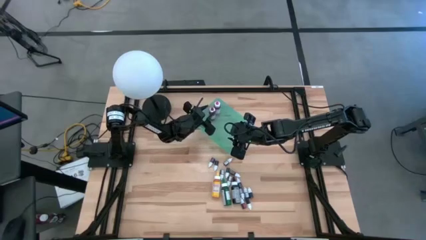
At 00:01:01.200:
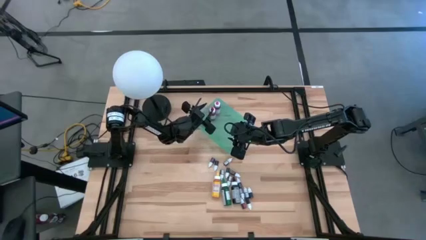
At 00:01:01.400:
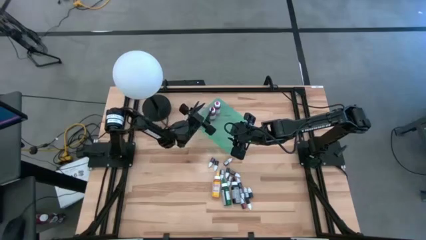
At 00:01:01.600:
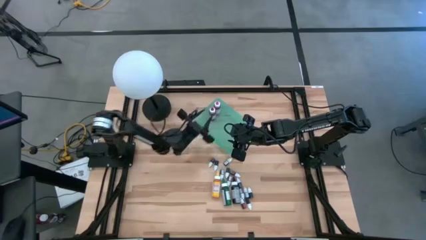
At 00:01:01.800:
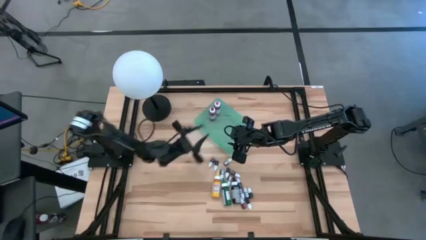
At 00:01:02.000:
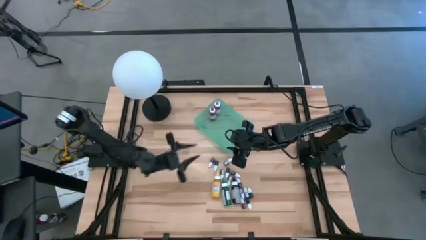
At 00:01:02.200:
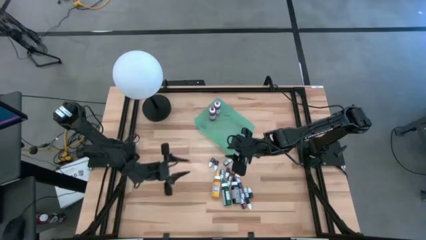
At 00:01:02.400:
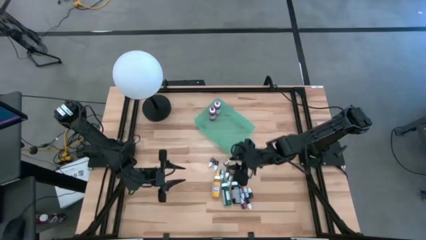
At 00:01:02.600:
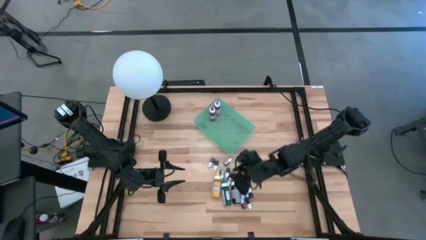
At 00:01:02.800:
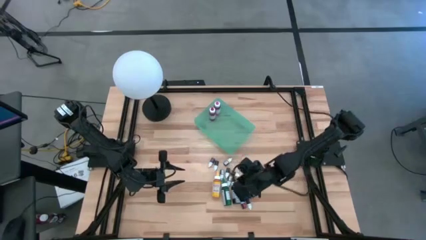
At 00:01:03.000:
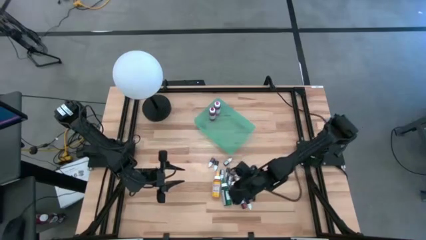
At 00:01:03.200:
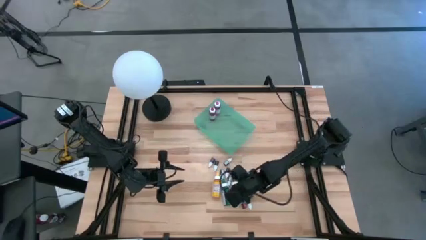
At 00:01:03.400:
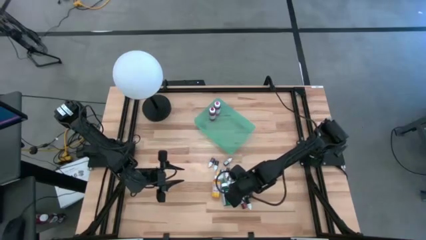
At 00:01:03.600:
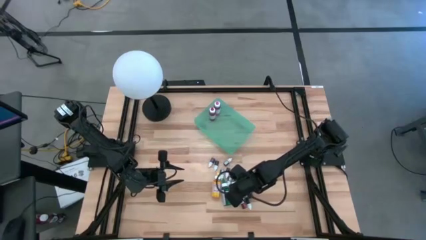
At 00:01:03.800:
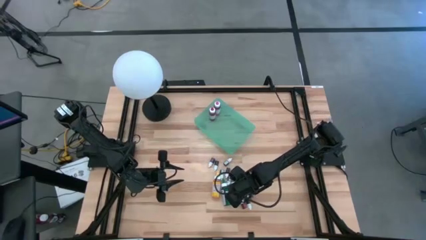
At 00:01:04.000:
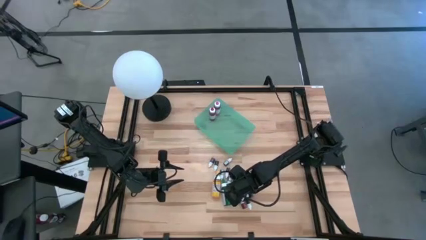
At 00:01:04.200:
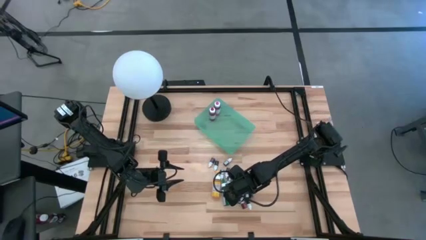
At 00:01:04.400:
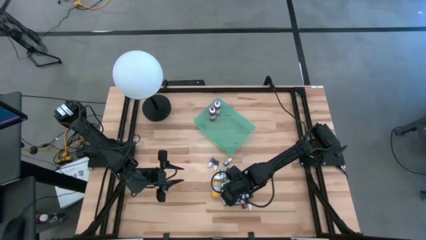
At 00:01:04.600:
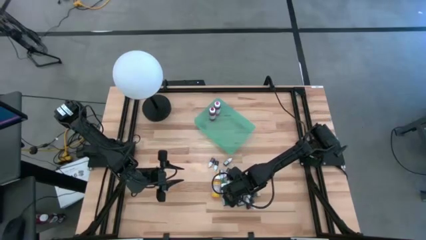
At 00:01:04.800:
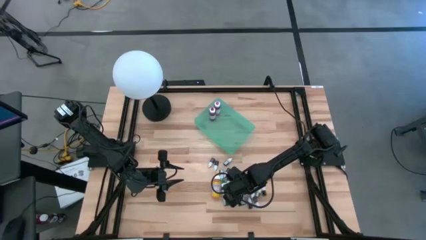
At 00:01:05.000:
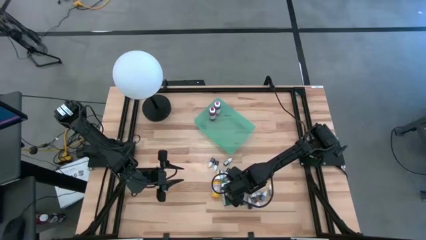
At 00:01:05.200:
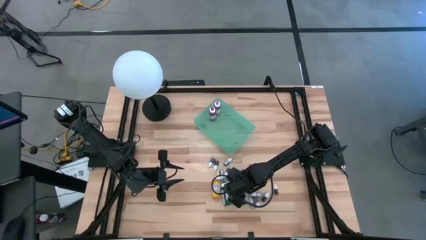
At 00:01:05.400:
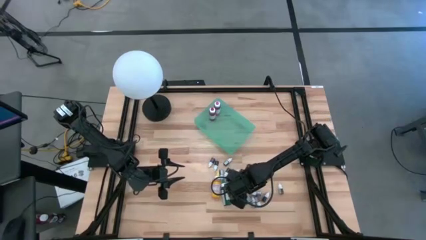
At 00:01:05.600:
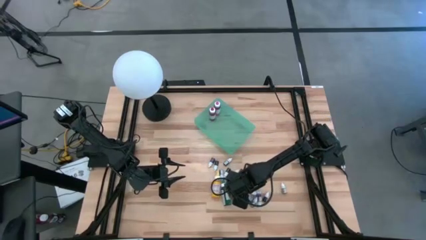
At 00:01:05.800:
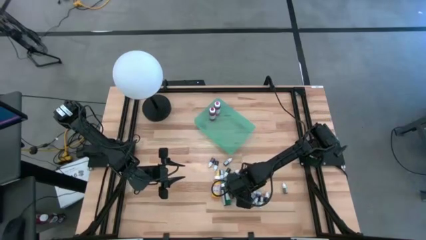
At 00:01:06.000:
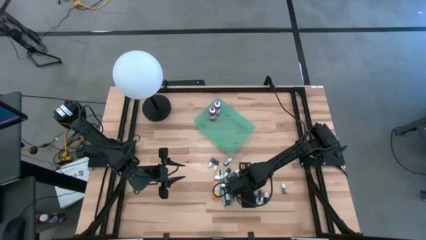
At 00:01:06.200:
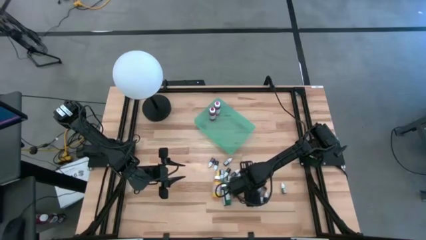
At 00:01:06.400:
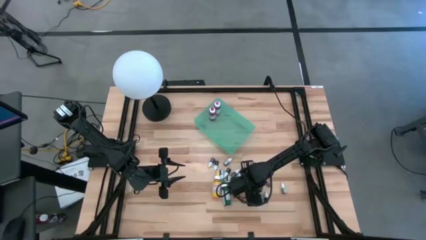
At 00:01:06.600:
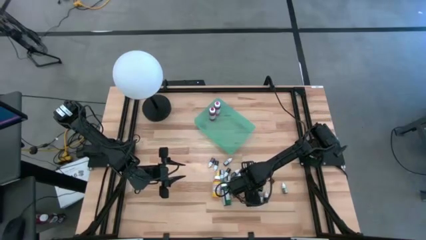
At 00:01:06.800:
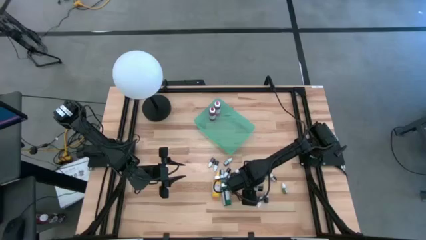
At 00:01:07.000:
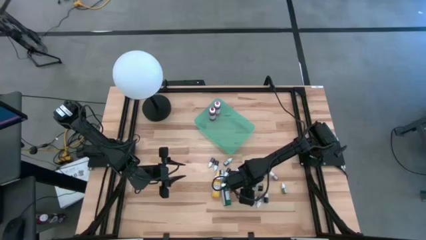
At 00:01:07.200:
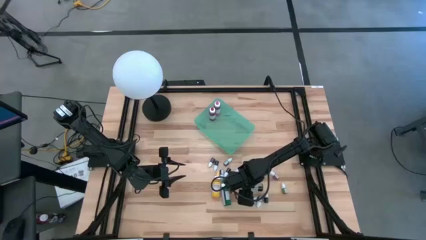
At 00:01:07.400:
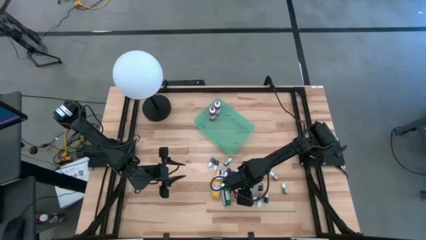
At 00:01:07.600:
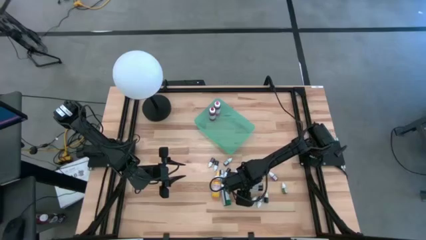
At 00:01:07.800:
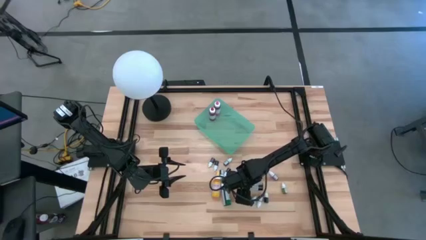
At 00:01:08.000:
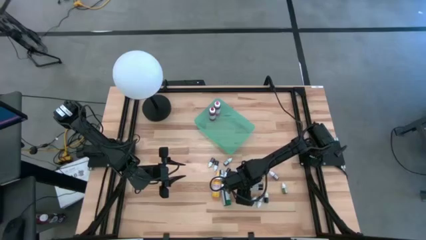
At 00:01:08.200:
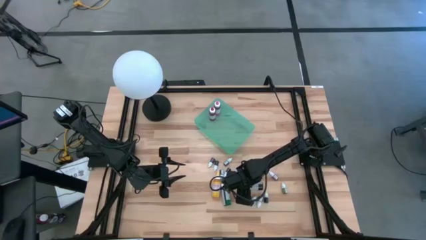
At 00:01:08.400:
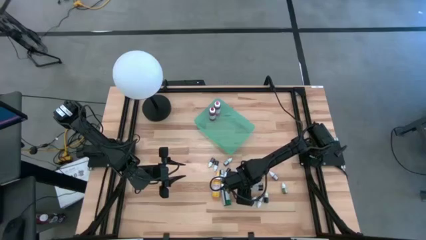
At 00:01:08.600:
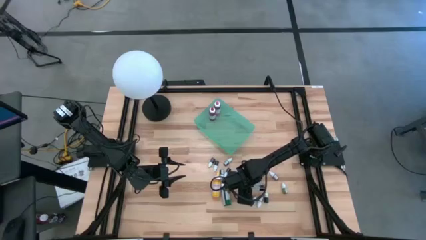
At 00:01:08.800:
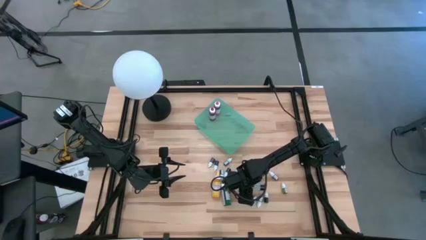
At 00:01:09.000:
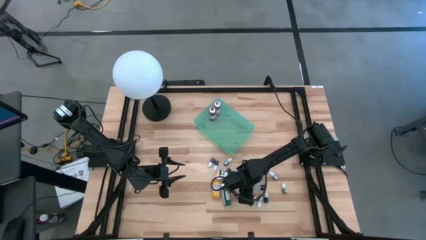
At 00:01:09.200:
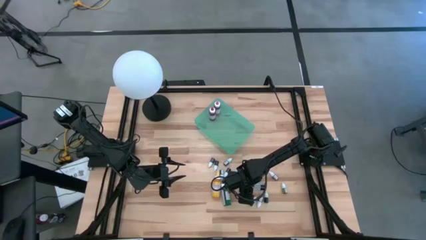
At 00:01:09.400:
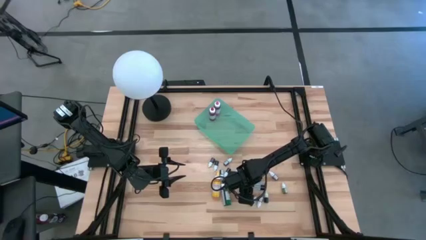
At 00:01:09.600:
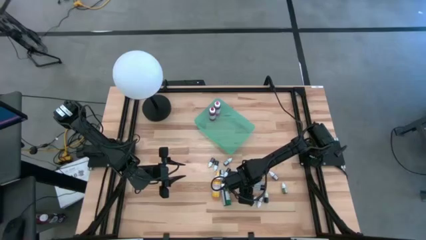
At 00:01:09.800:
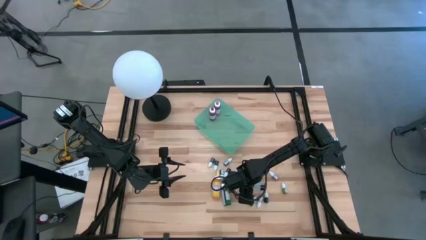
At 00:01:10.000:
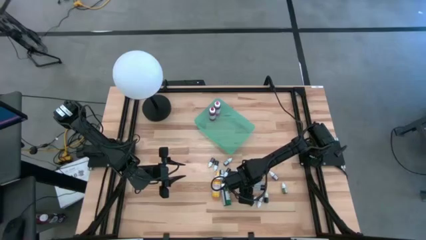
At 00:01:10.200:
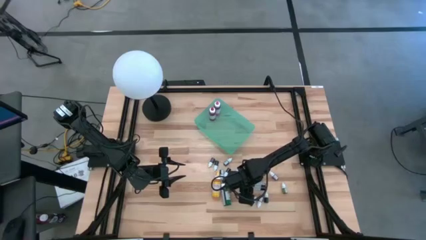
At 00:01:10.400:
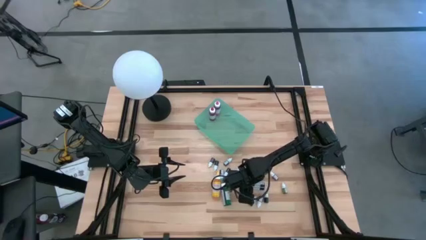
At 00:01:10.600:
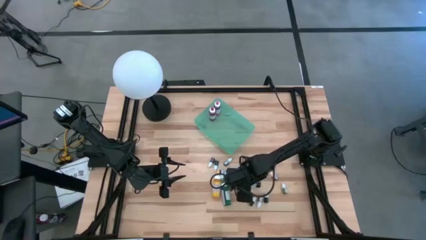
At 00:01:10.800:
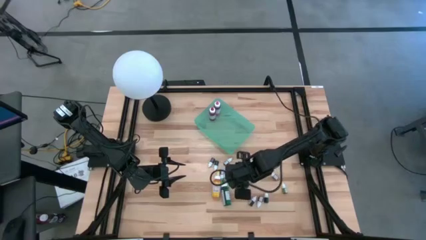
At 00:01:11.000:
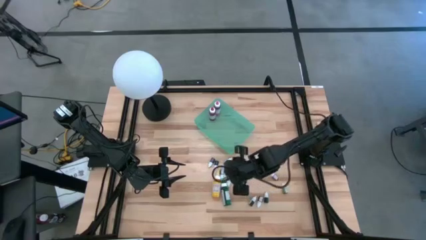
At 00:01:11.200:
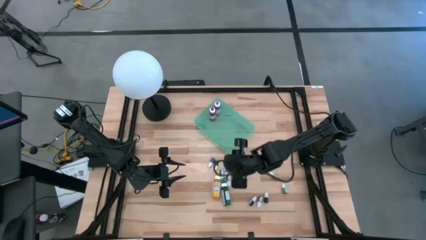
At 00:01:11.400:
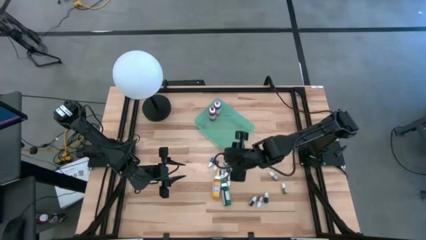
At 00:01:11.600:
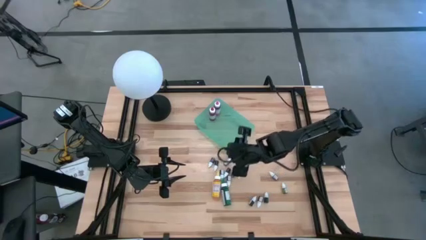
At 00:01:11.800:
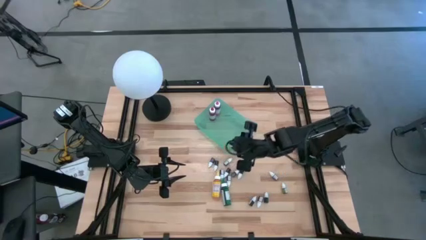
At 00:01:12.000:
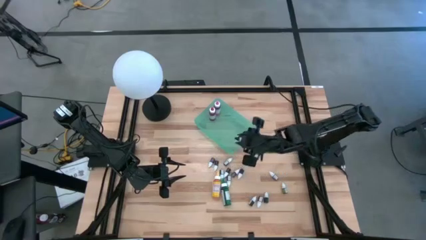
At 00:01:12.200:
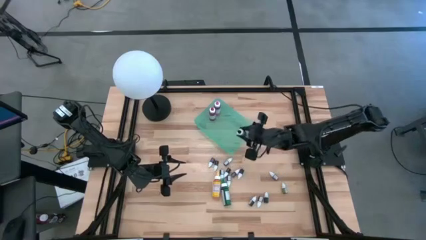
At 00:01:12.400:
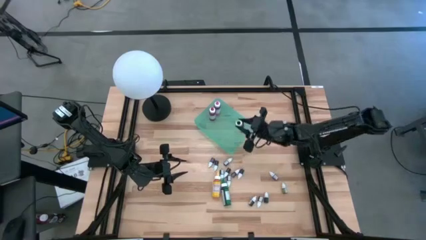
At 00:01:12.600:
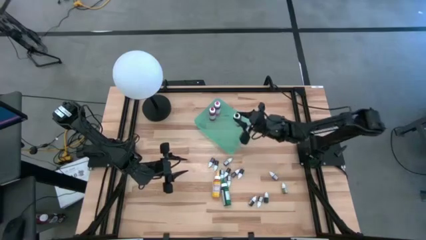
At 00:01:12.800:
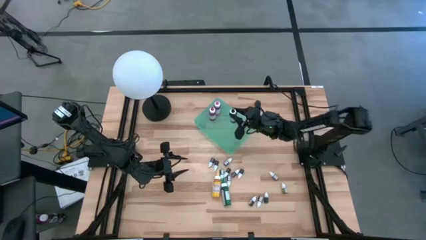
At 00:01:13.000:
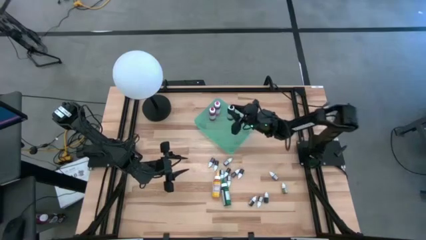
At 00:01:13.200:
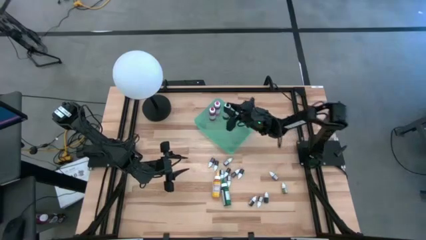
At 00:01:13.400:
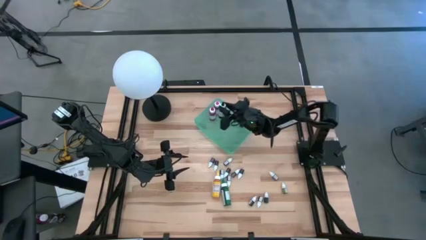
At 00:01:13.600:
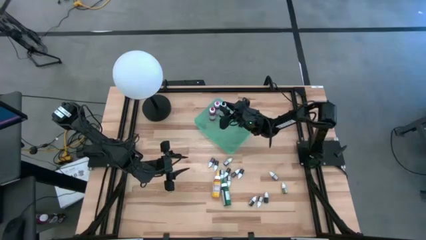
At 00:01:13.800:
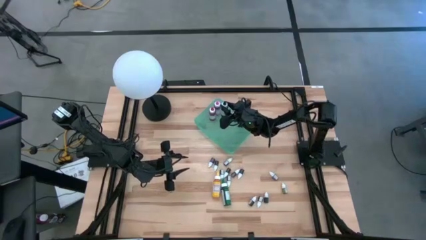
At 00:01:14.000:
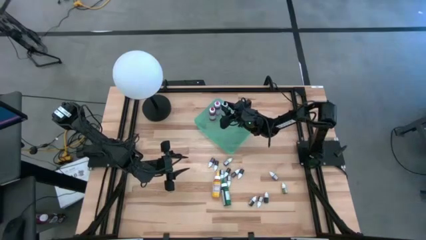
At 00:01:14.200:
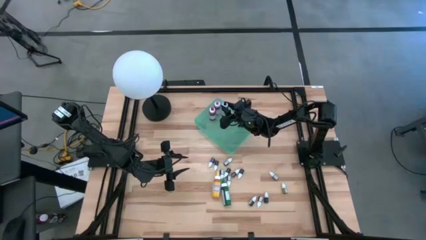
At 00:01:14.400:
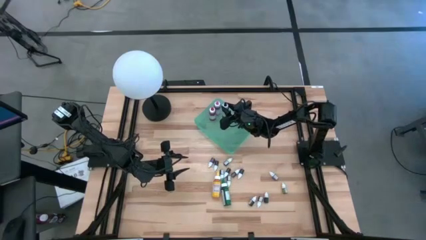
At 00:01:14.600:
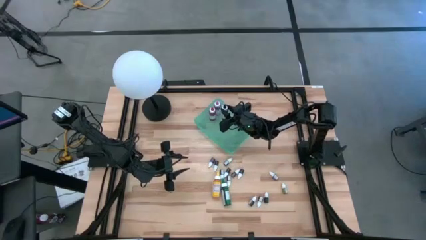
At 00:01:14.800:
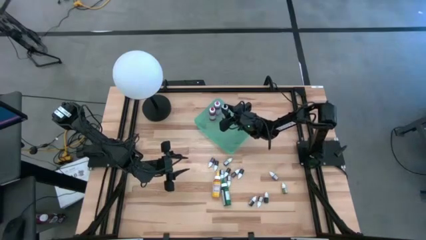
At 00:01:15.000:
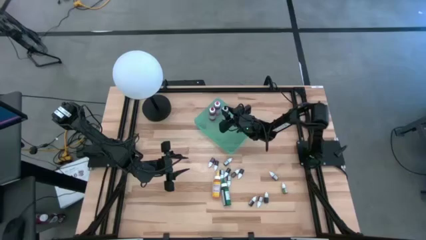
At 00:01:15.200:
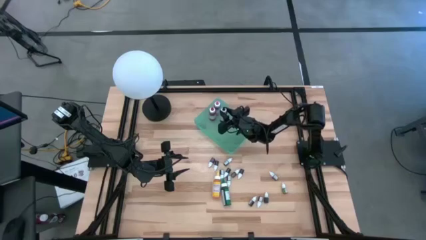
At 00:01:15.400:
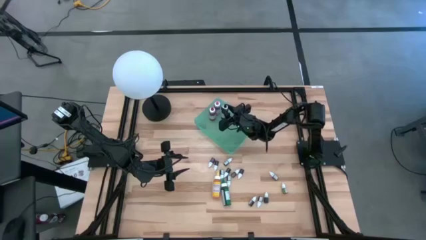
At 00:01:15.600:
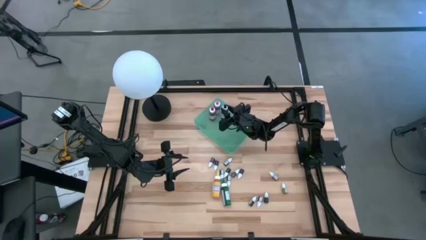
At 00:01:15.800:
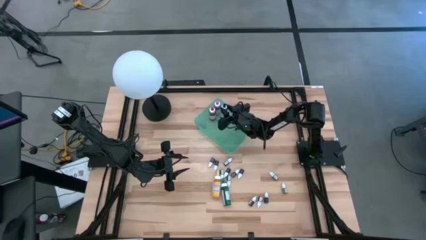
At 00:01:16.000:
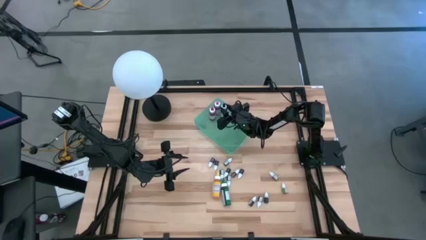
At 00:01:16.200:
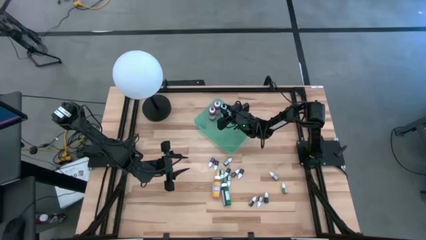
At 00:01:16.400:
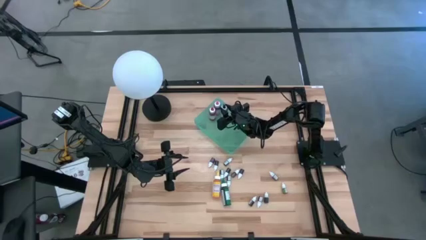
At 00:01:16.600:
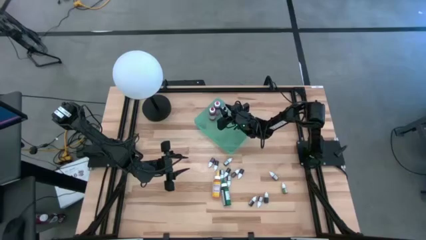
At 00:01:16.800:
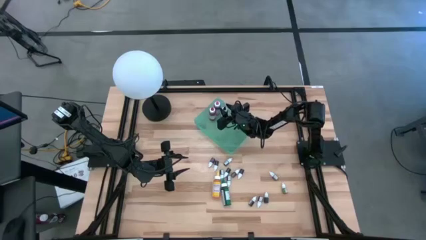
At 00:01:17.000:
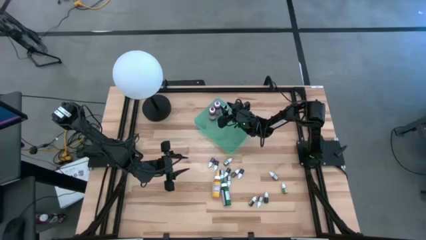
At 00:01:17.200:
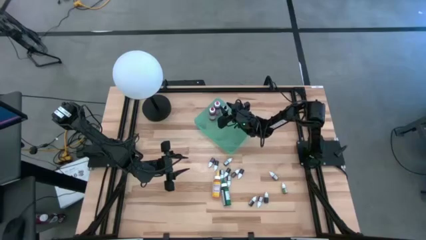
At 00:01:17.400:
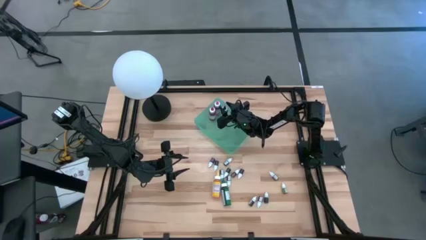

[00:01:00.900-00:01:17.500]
Task: Pick & Place food coloring
Put the large black food coloring bottle into the green bin
